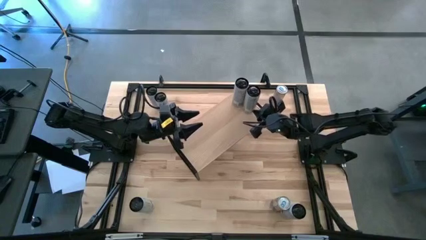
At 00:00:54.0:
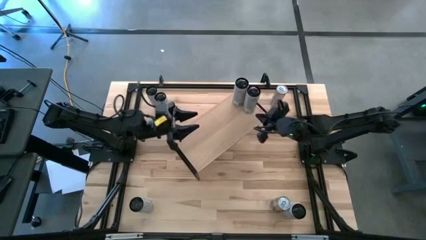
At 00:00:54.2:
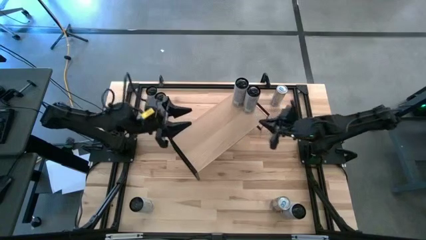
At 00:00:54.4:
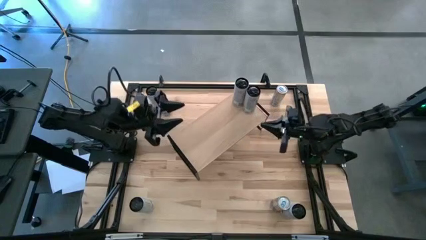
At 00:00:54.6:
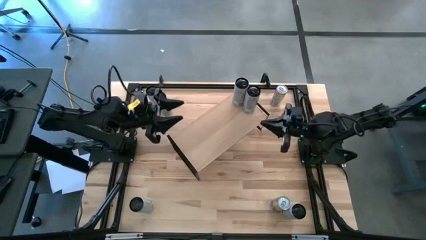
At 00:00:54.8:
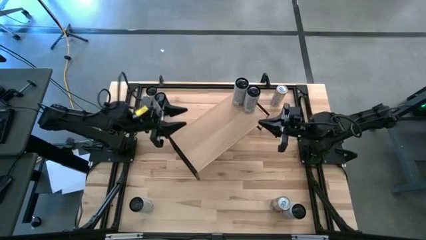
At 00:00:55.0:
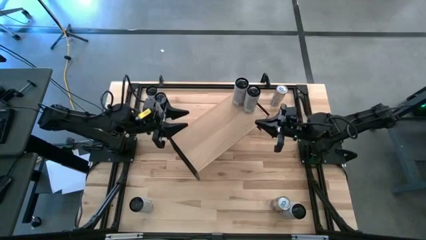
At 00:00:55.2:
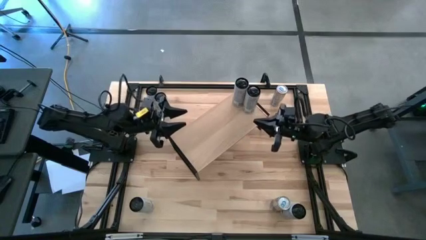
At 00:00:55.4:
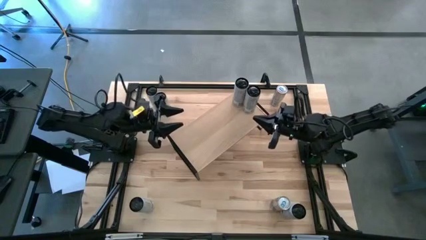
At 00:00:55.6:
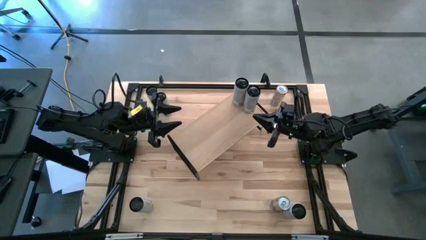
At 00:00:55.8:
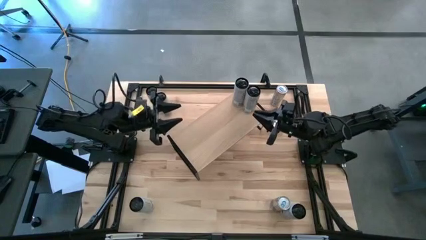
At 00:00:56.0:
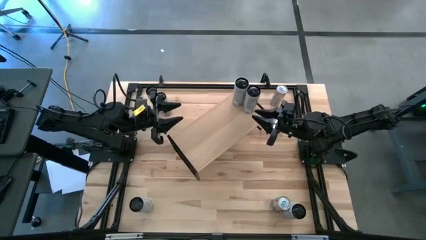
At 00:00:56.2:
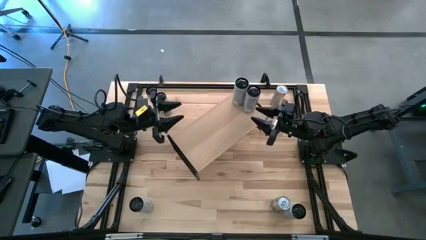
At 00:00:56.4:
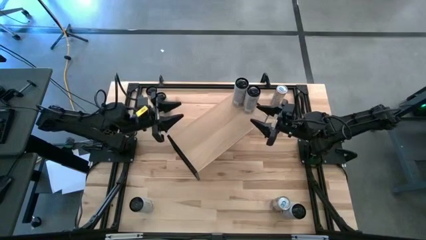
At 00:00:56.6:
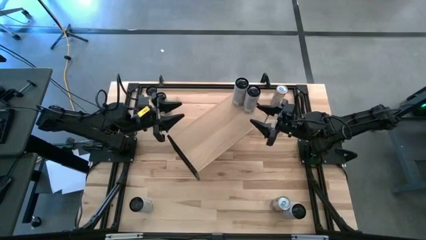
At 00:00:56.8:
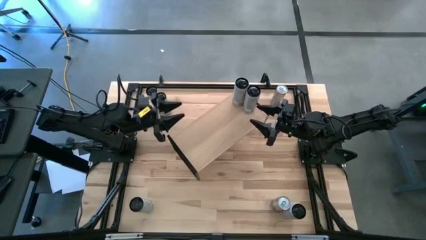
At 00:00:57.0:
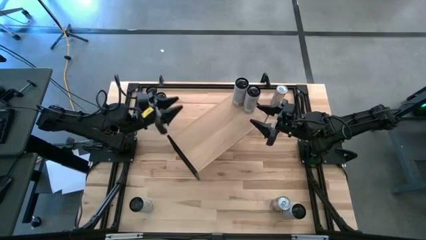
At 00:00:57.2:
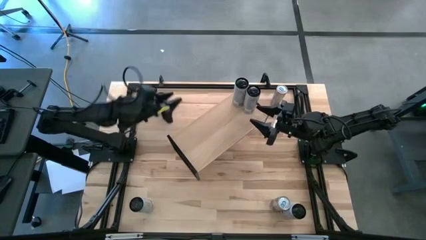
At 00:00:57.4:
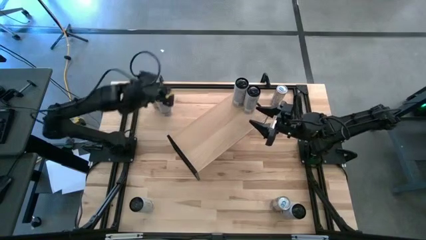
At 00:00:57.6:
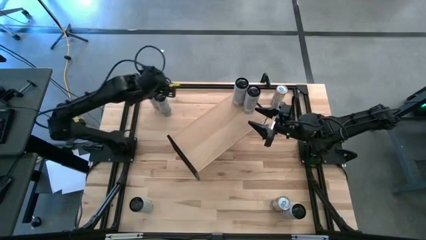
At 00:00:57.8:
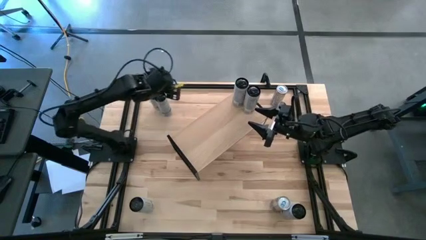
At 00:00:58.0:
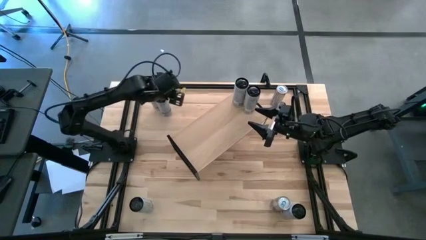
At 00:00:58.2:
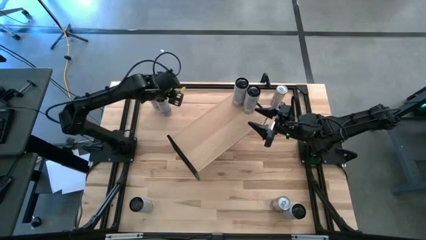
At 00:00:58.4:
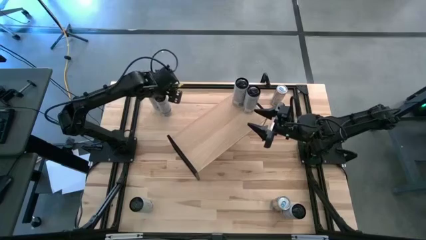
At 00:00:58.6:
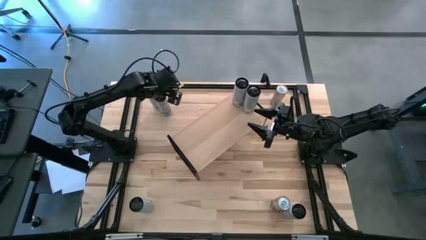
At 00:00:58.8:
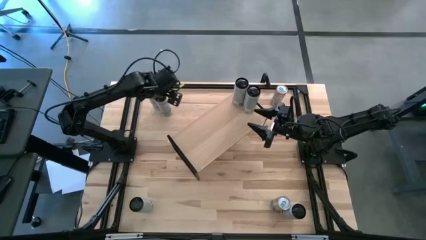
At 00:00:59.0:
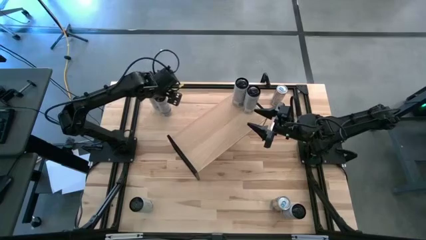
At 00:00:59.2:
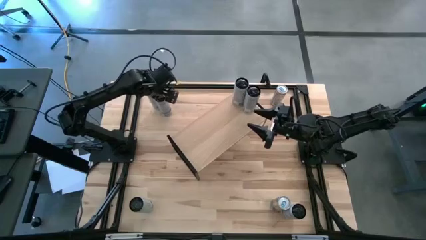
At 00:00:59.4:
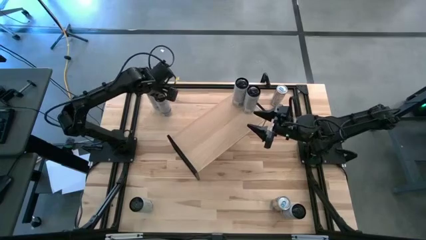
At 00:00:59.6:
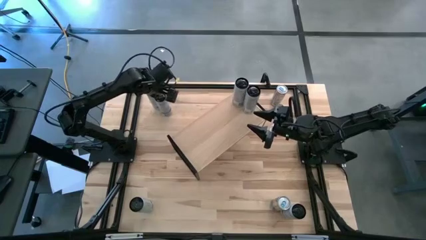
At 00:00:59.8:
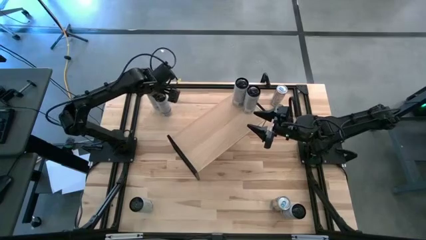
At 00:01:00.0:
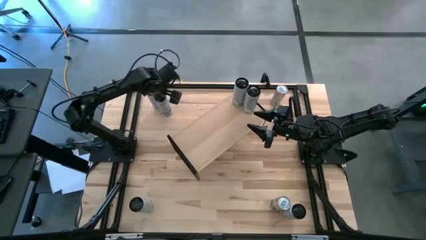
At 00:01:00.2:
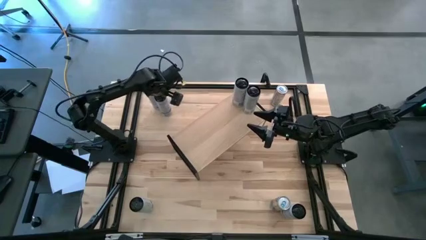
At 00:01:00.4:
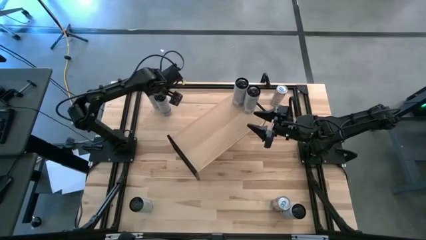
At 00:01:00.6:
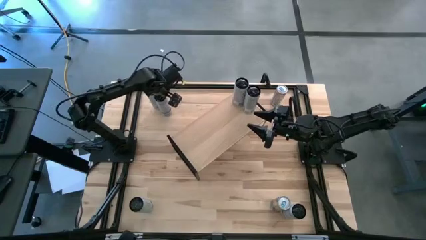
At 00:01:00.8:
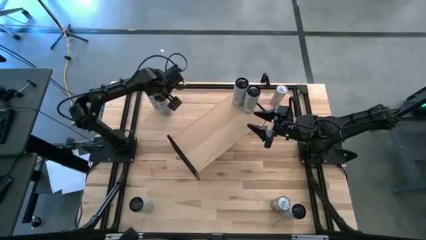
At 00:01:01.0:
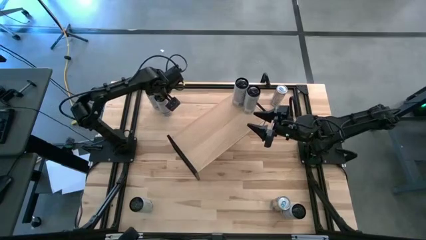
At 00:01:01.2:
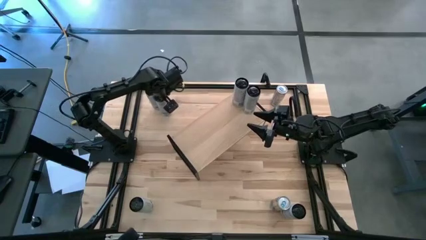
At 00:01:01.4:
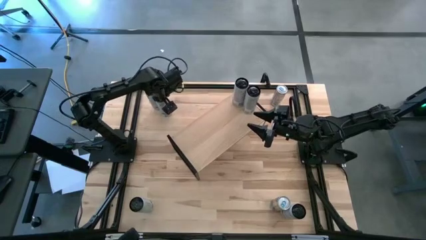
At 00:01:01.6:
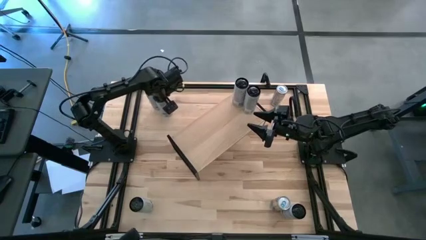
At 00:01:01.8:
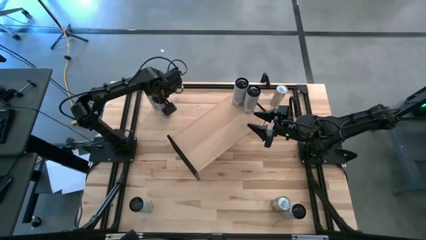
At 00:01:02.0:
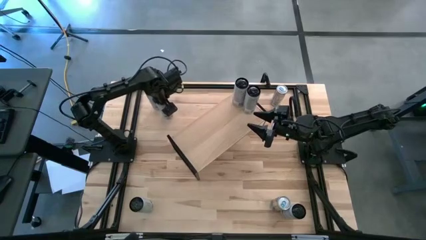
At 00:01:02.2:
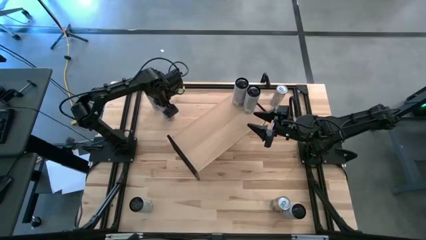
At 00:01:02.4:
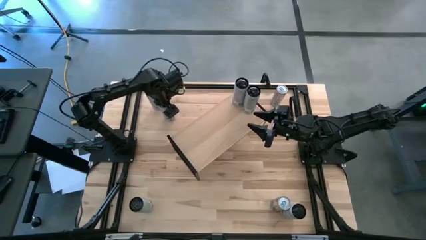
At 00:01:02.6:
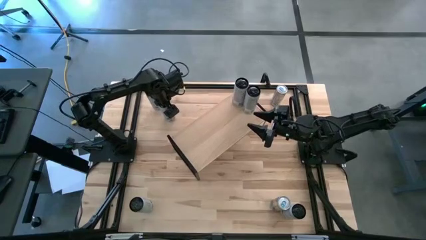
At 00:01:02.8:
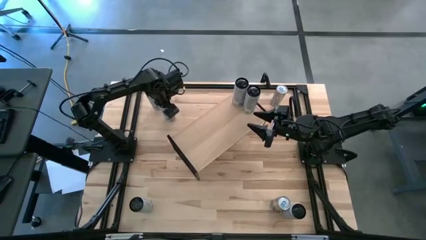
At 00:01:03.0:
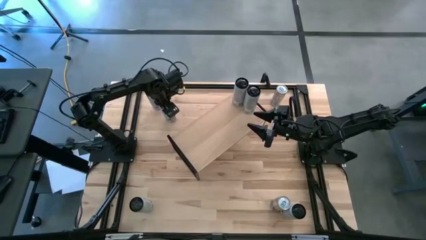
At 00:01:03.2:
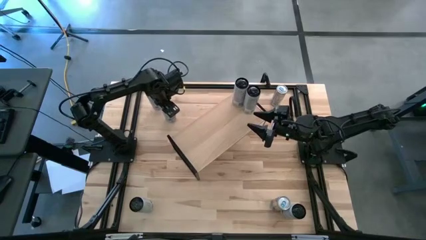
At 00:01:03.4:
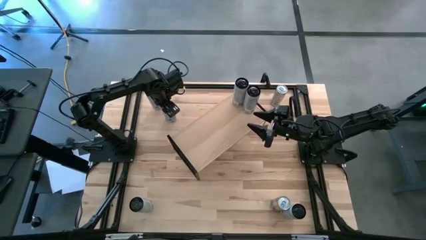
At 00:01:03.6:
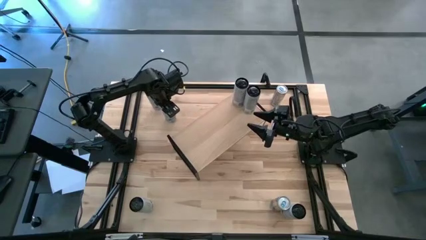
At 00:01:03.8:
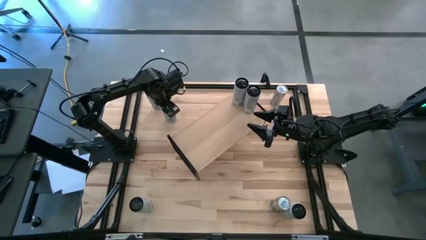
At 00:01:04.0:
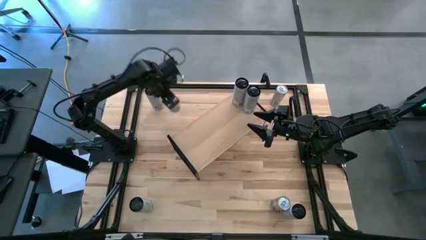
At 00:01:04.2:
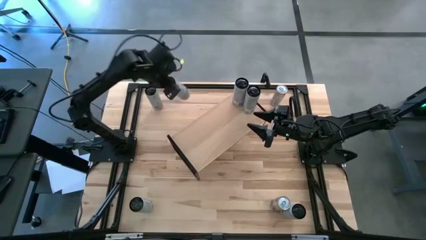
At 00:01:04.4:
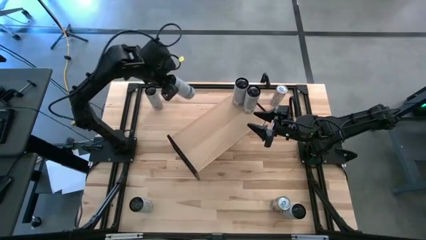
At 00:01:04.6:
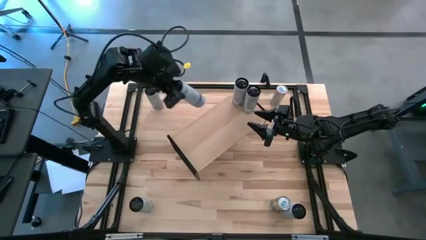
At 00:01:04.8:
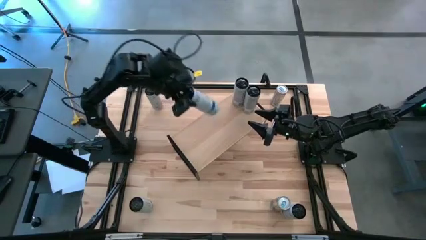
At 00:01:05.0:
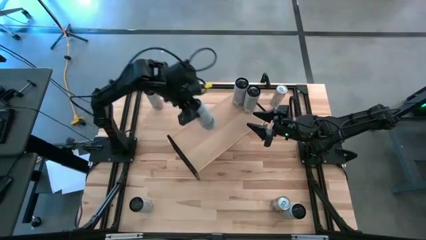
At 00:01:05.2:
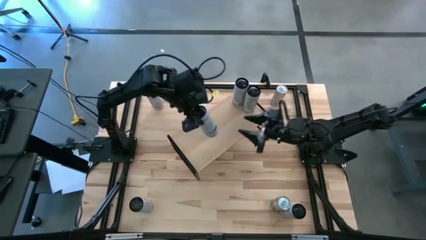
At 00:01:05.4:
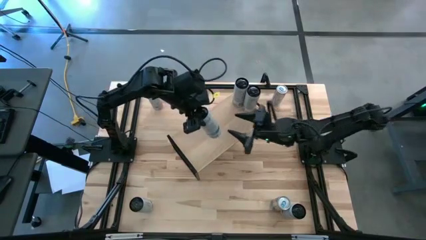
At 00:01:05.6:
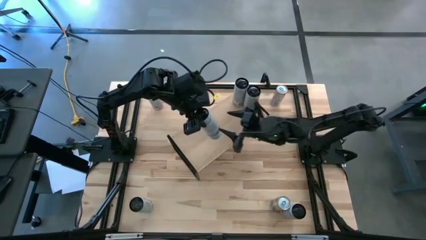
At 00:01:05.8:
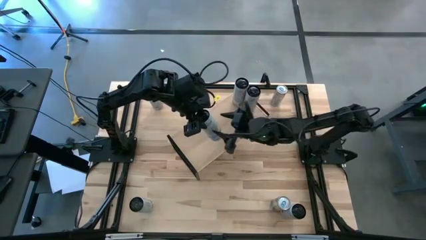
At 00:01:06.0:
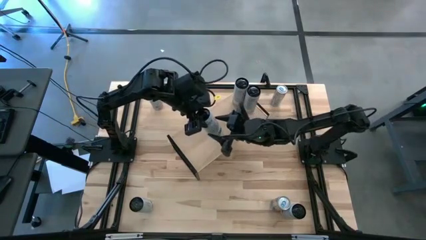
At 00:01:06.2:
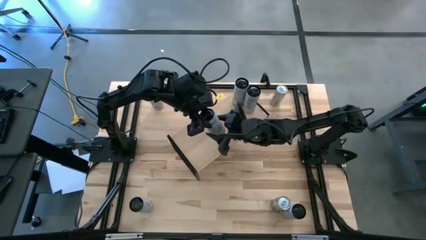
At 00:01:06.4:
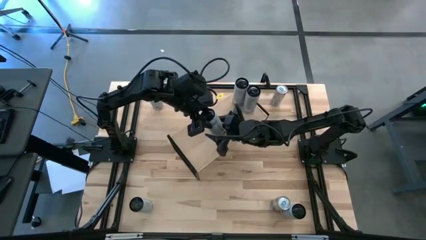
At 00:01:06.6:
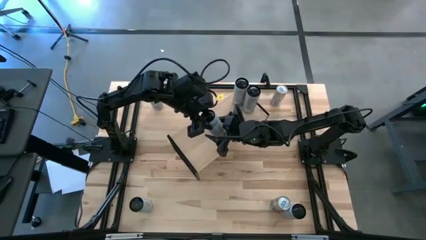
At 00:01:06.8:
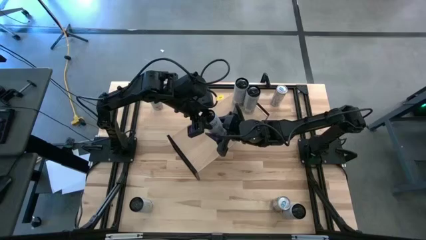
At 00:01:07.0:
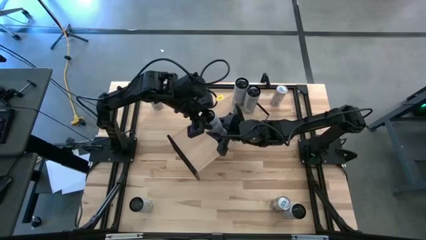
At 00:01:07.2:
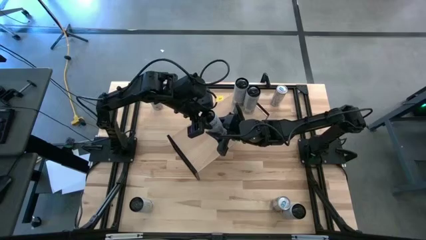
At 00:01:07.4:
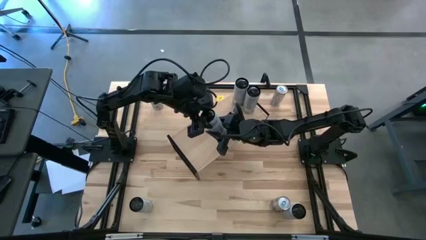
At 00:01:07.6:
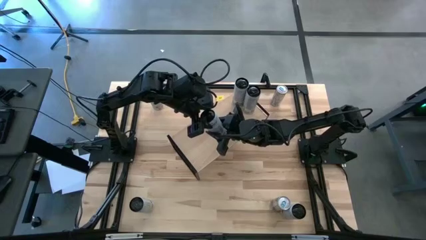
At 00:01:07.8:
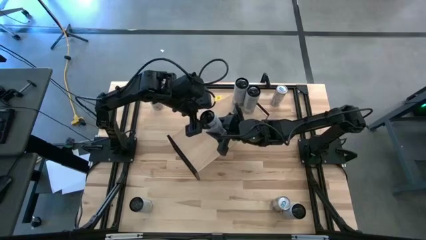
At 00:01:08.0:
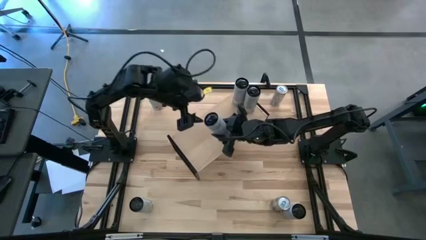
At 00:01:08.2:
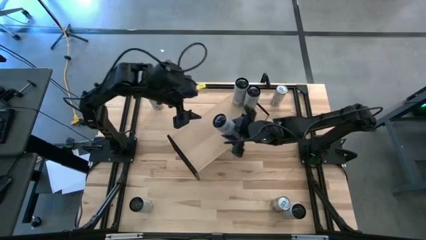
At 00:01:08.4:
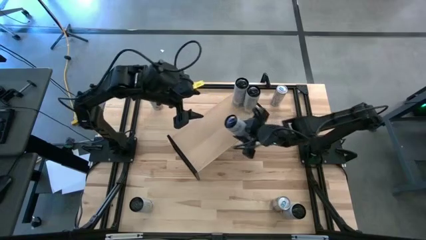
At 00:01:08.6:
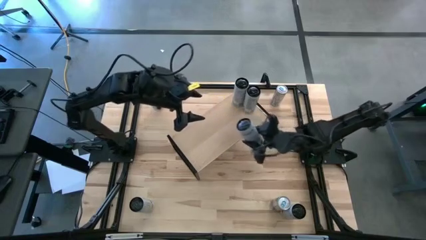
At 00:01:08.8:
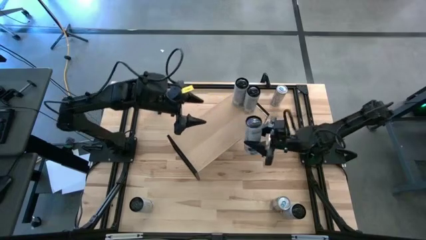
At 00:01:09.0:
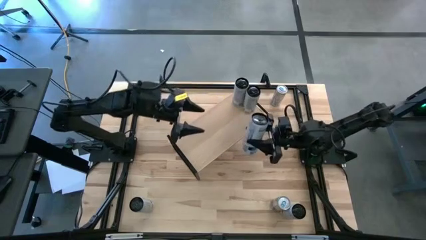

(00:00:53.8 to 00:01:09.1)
Task: Place canned beverage on shelf
Put the top white-blue soda can on the shelf
